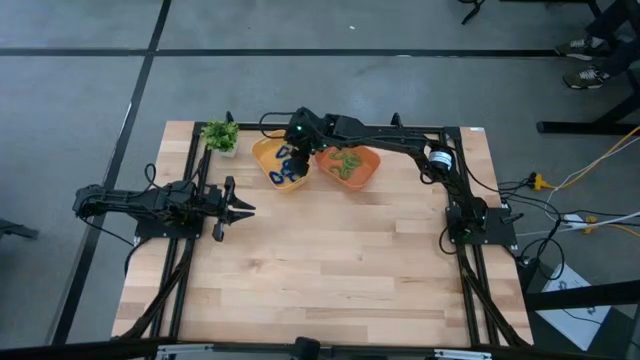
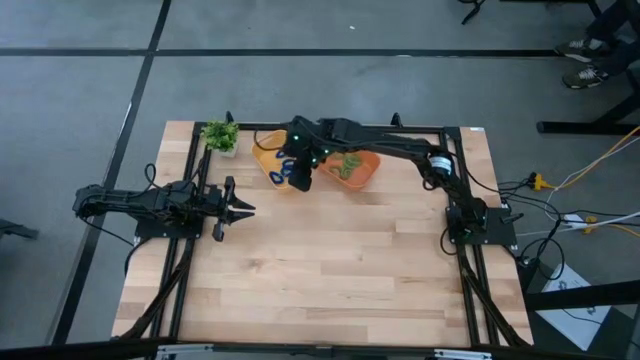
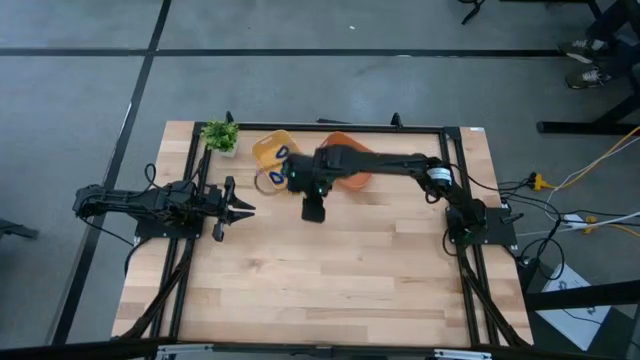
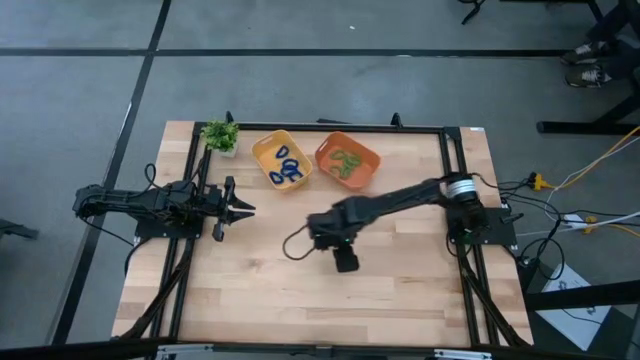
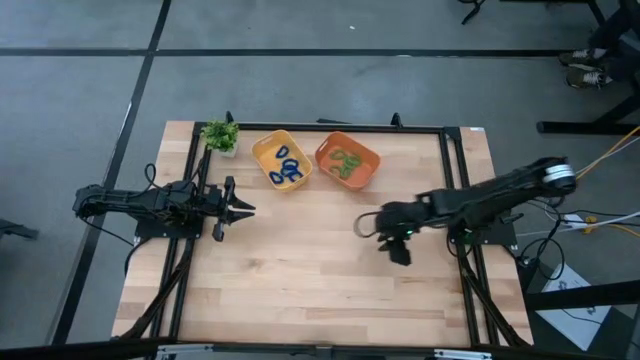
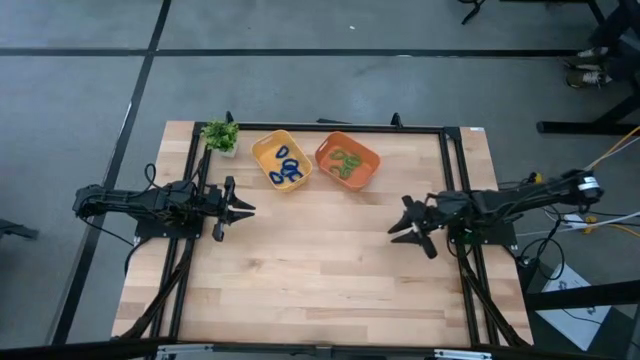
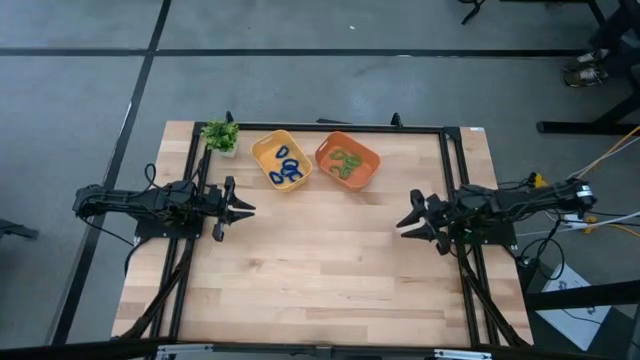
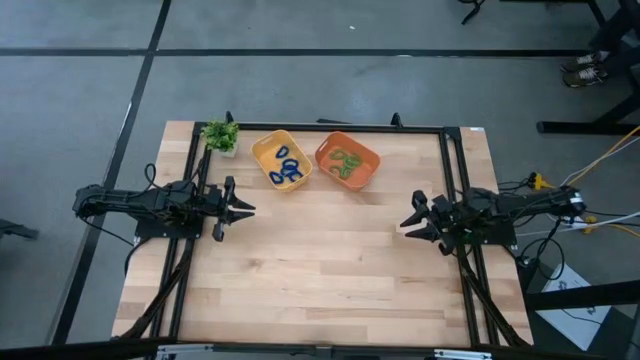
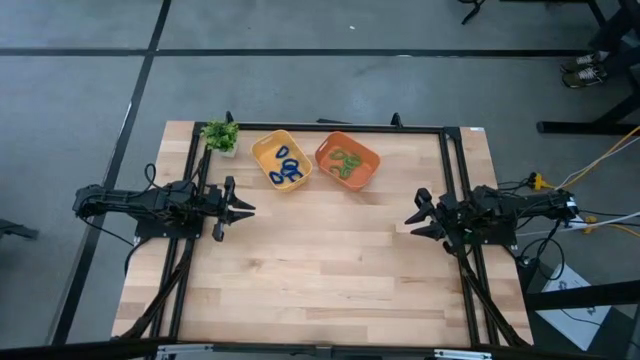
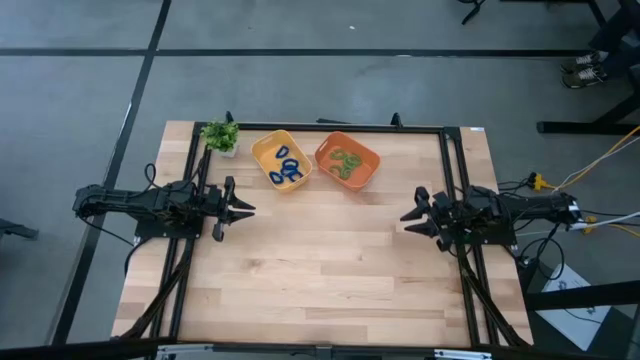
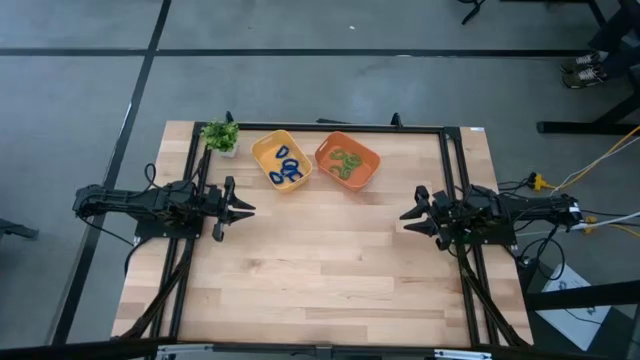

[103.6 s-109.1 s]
Task: Sort spring keychains
Return to Home Position

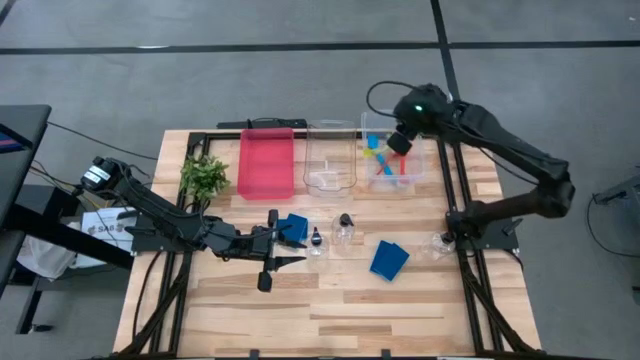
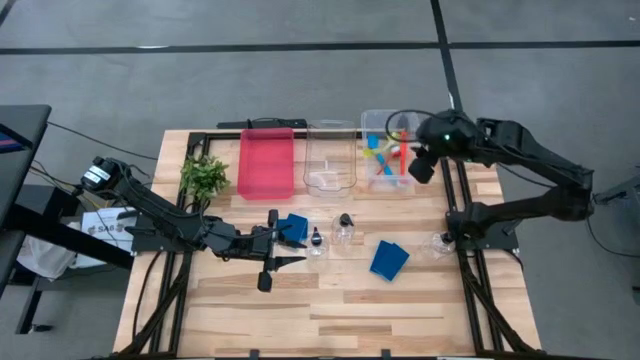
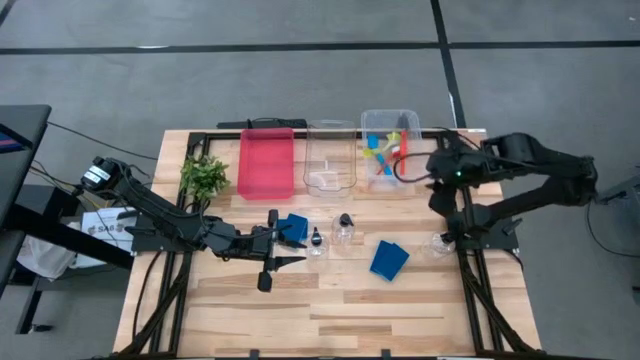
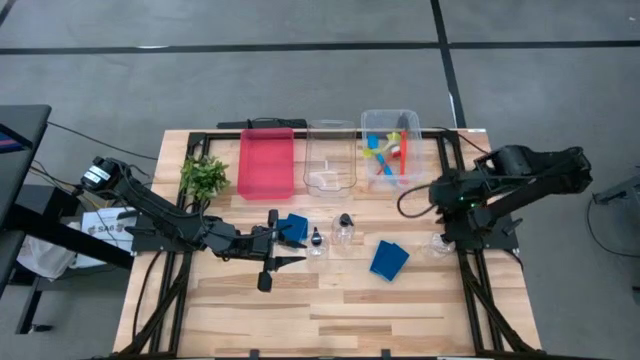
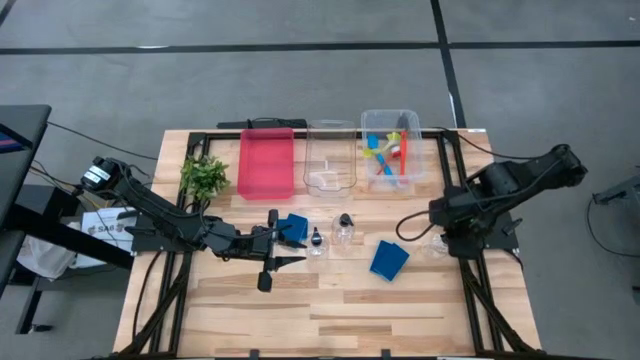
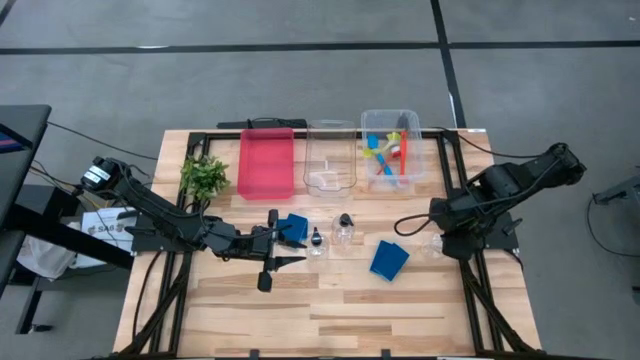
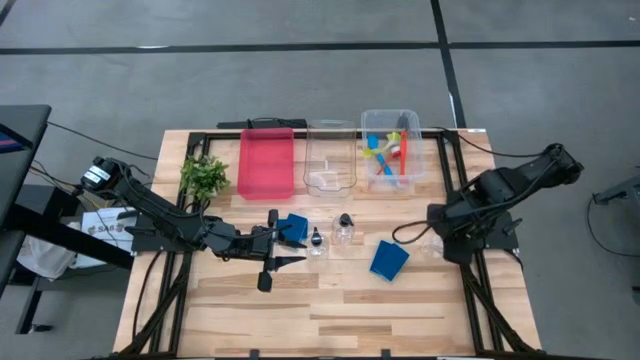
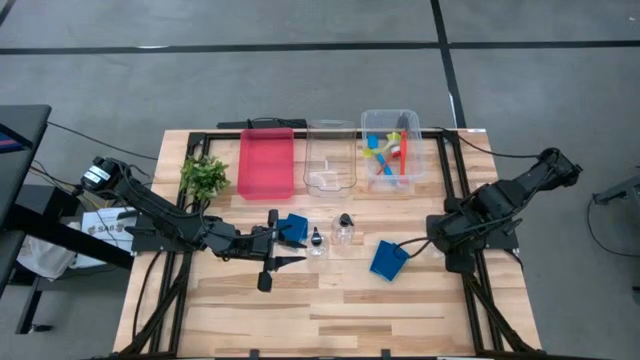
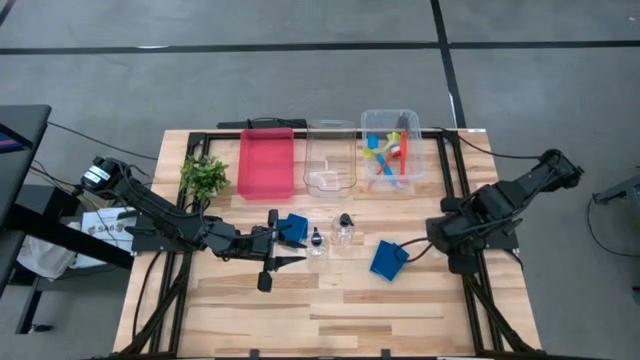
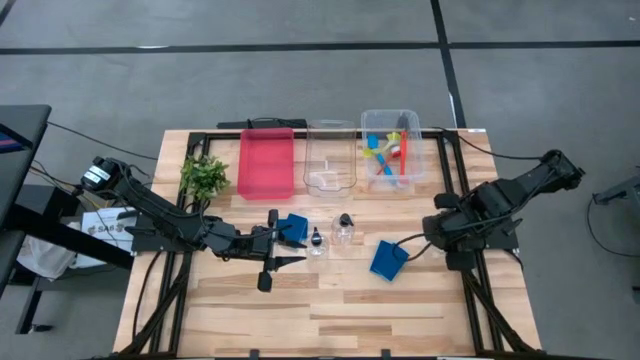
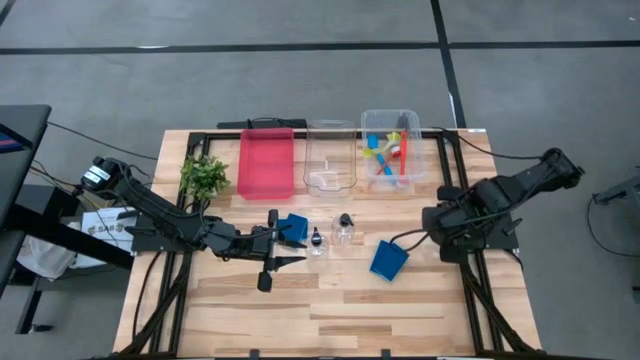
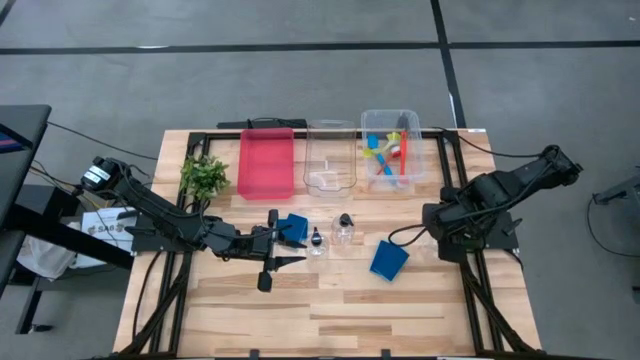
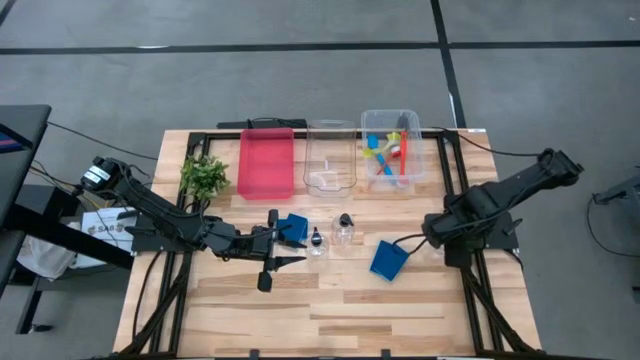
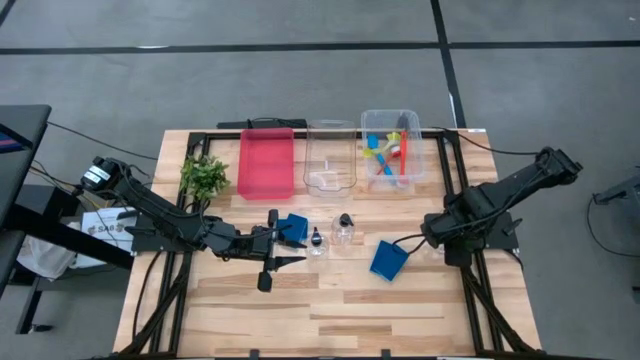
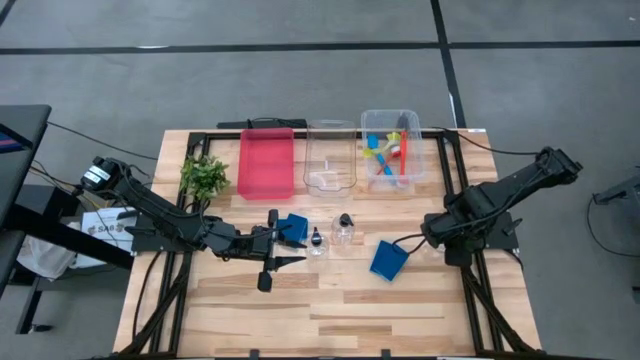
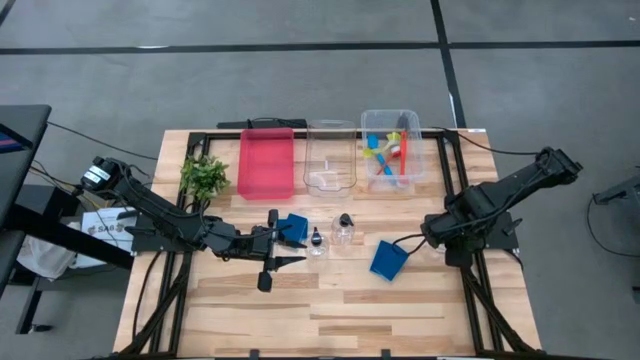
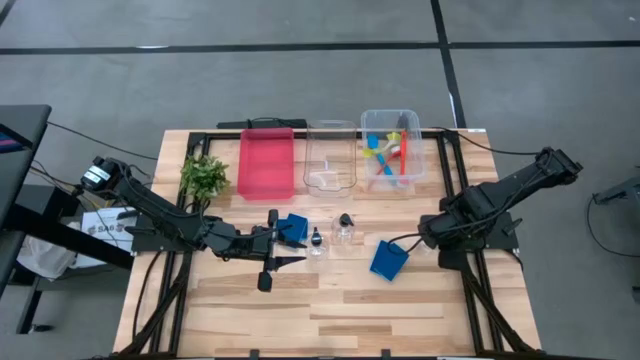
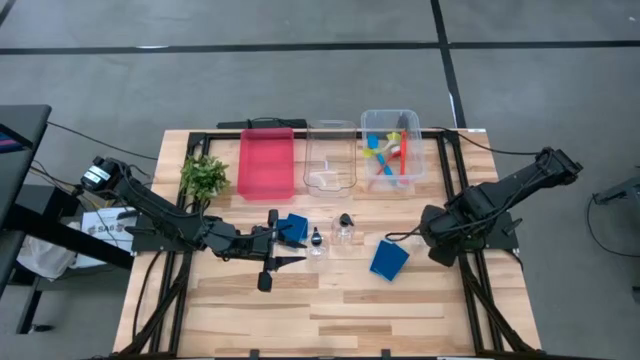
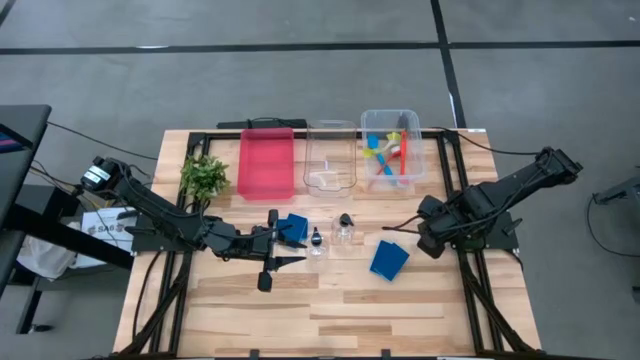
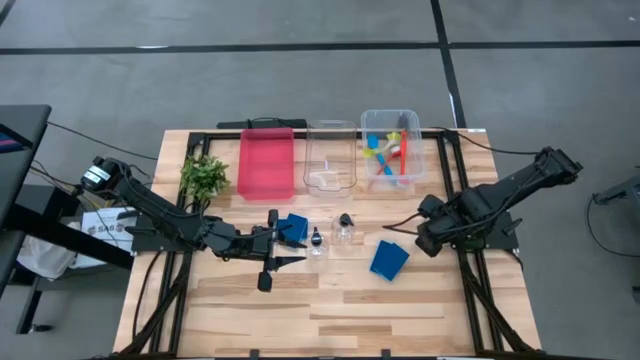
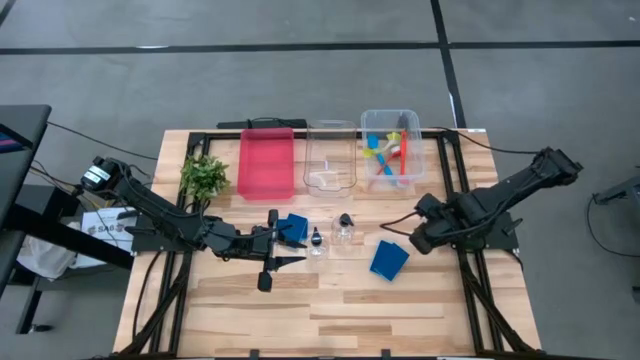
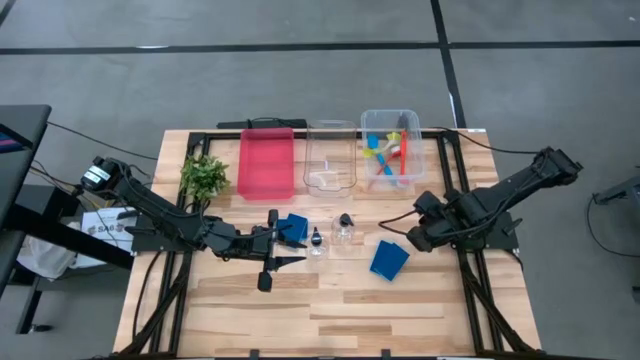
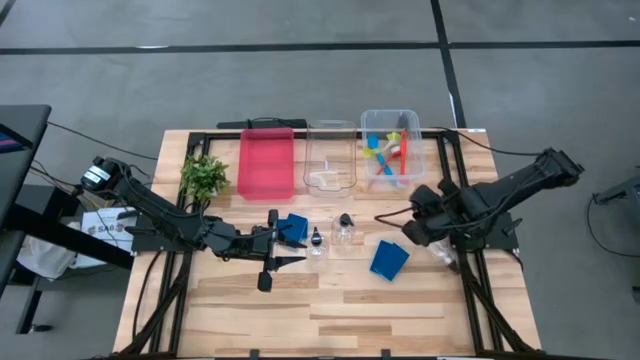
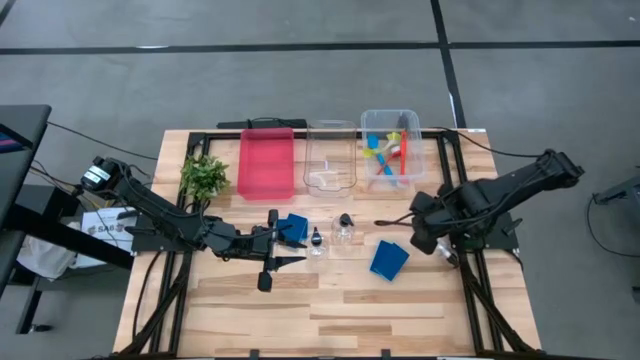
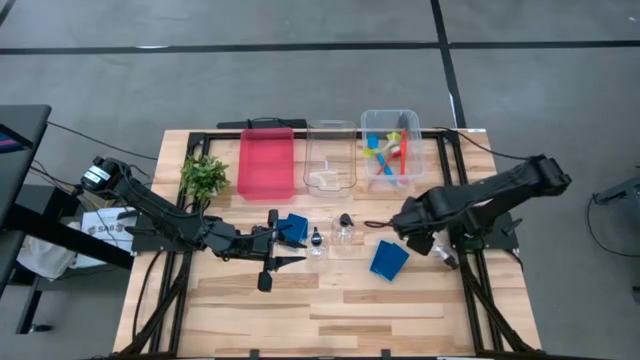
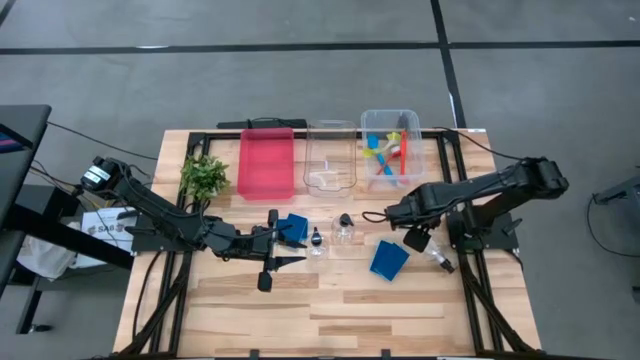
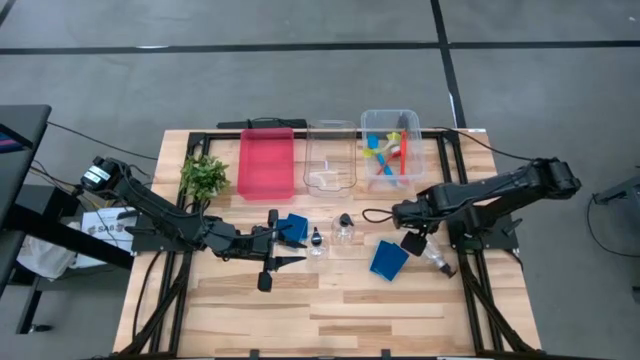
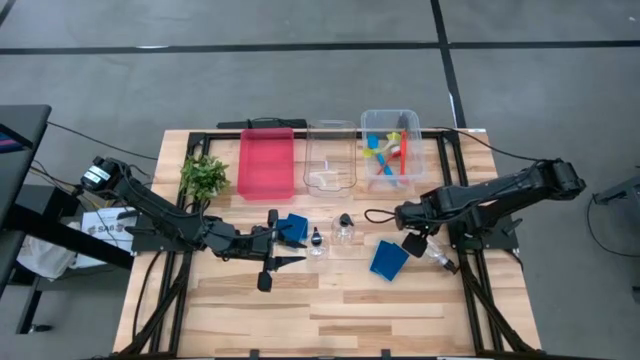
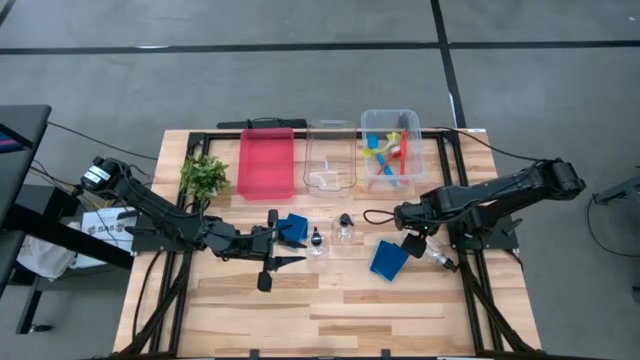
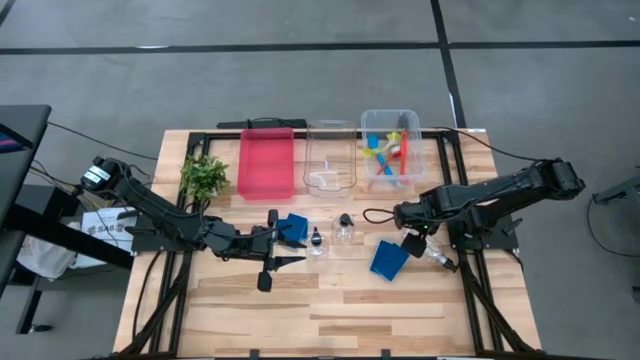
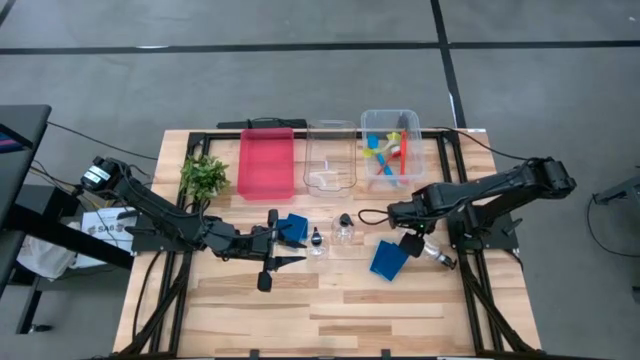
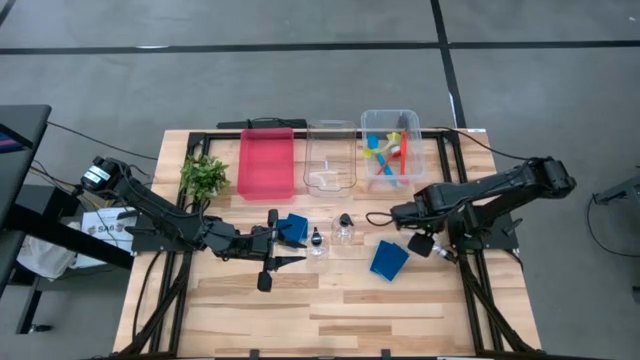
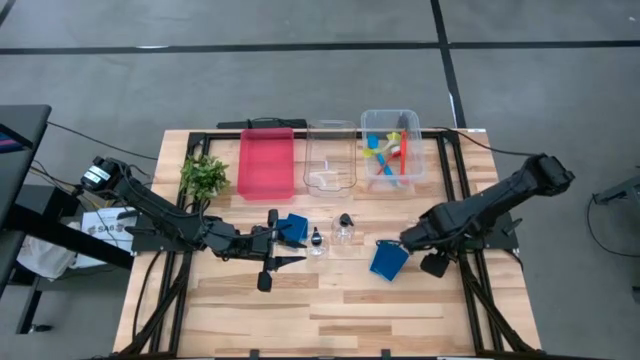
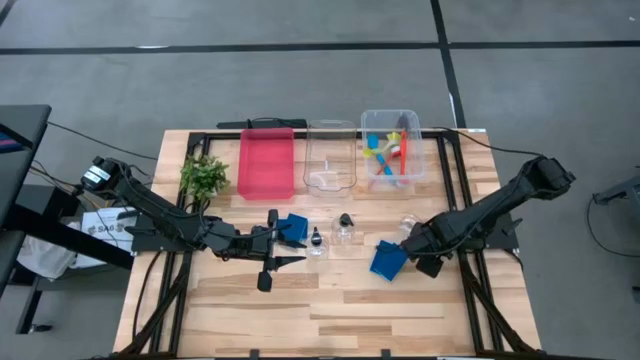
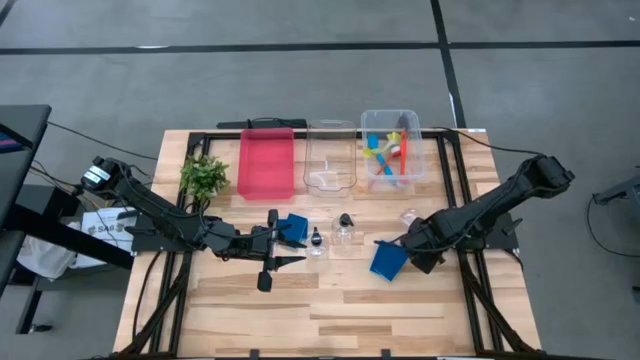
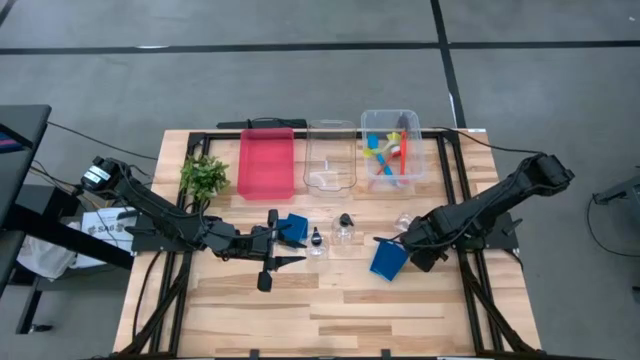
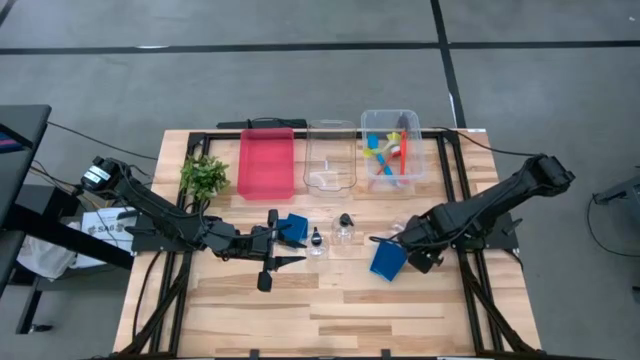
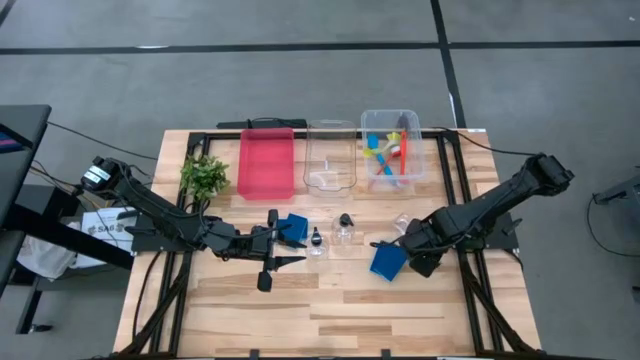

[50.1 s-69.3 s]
Task: Pick & Place Kitchen Sink Supplies
Put the soap dispenser into the transparent bin
